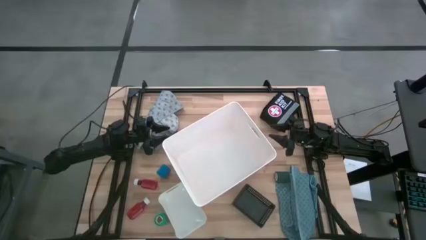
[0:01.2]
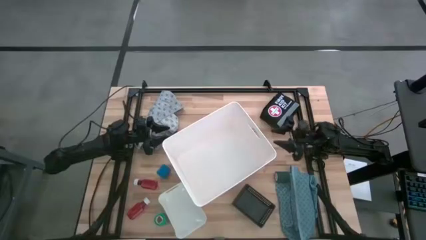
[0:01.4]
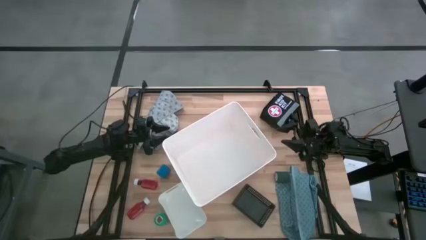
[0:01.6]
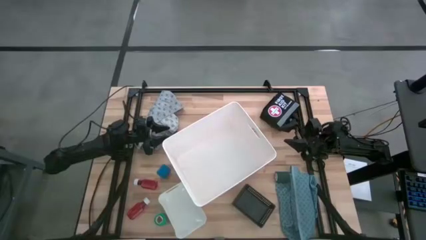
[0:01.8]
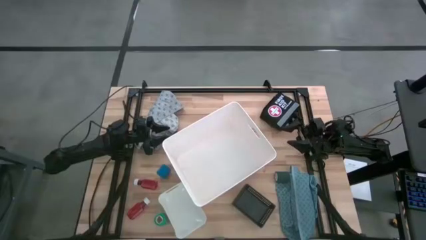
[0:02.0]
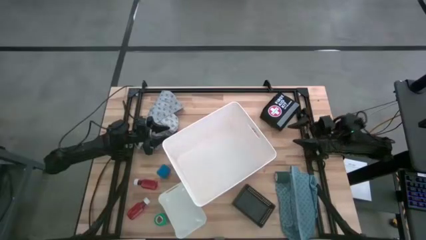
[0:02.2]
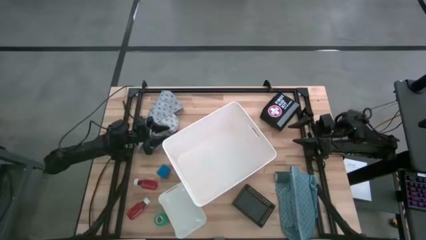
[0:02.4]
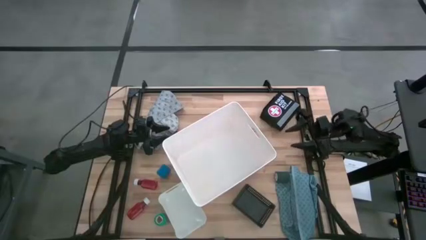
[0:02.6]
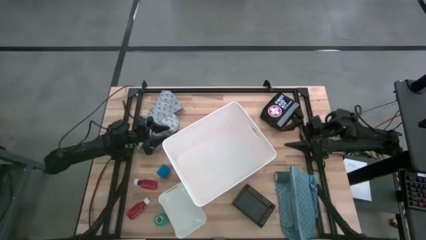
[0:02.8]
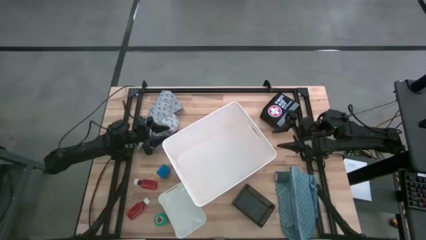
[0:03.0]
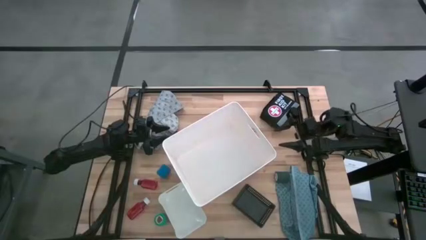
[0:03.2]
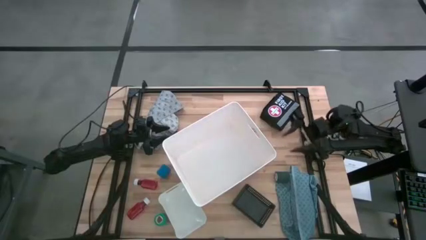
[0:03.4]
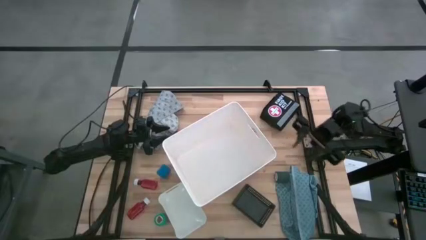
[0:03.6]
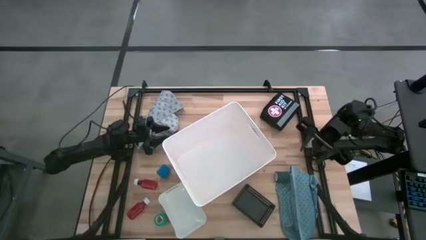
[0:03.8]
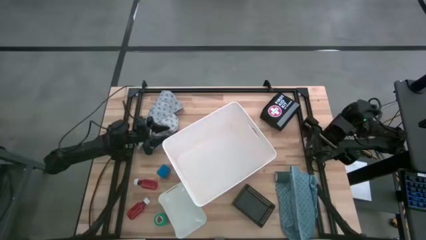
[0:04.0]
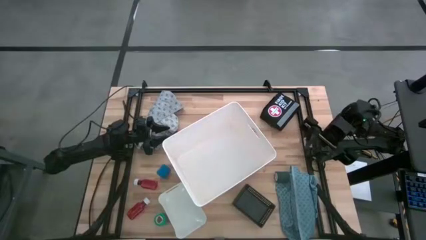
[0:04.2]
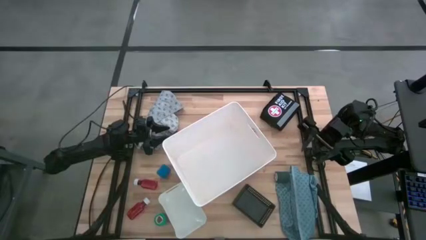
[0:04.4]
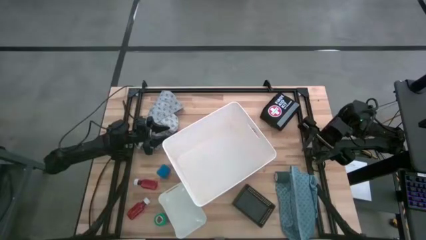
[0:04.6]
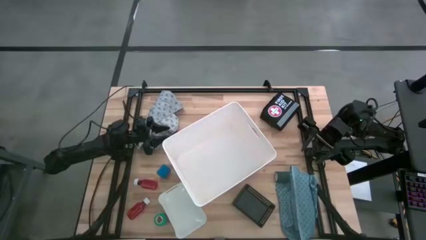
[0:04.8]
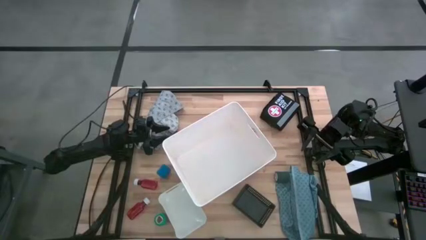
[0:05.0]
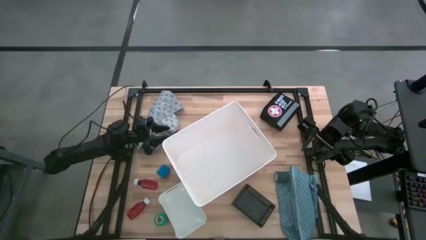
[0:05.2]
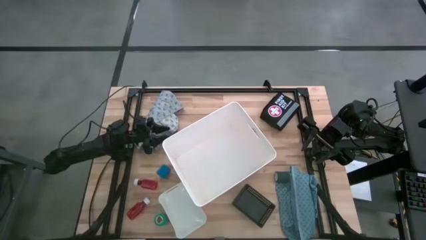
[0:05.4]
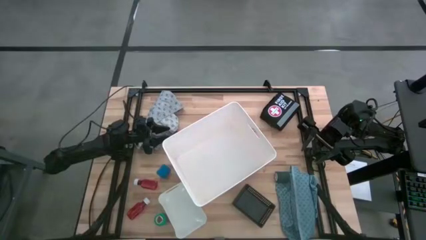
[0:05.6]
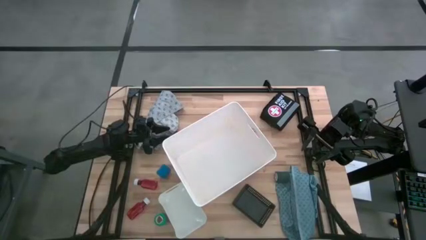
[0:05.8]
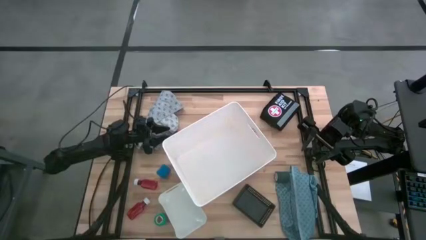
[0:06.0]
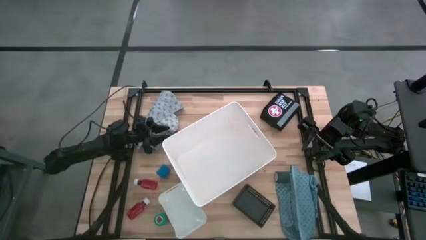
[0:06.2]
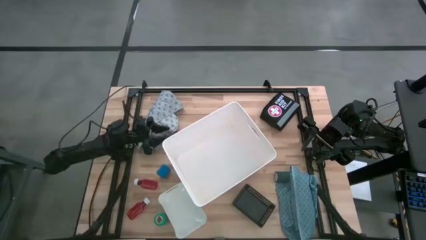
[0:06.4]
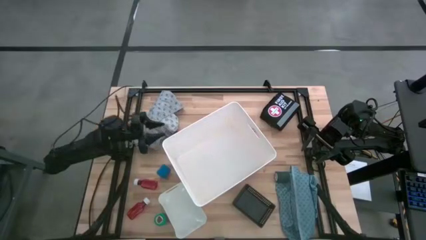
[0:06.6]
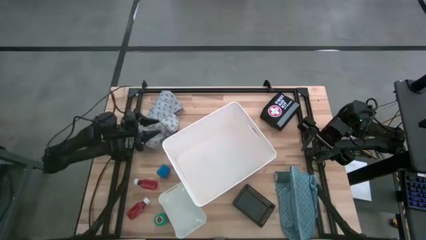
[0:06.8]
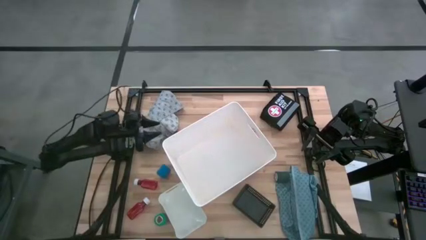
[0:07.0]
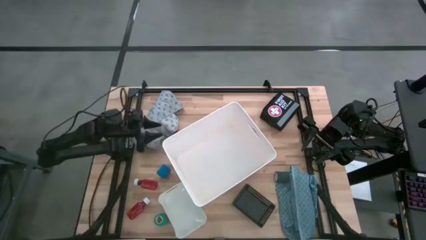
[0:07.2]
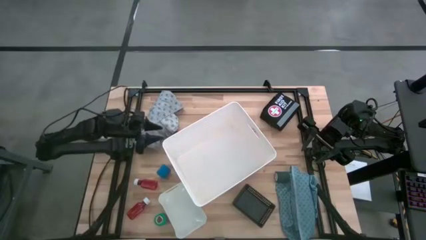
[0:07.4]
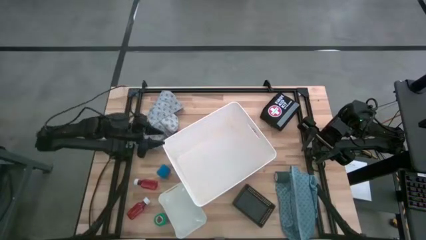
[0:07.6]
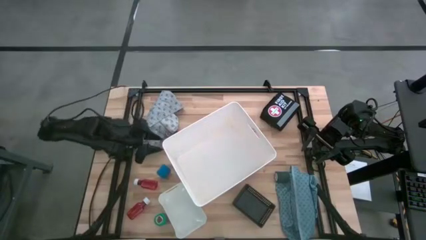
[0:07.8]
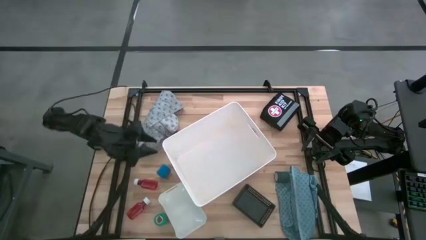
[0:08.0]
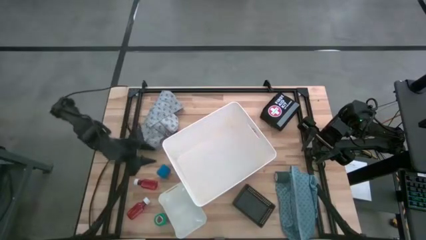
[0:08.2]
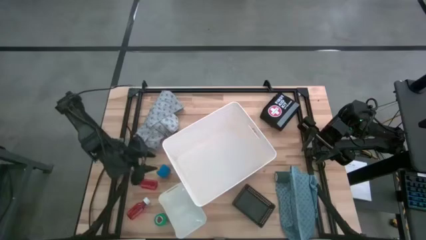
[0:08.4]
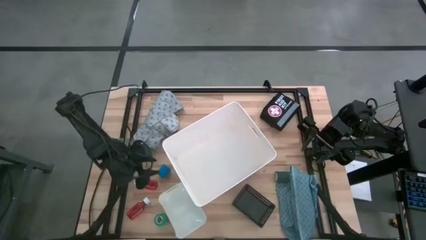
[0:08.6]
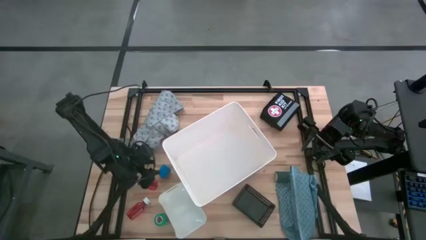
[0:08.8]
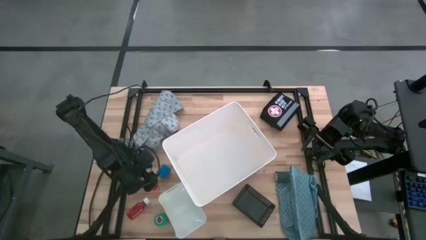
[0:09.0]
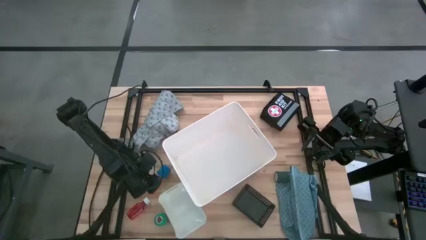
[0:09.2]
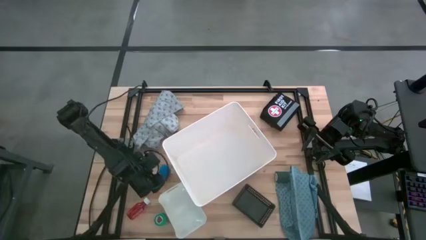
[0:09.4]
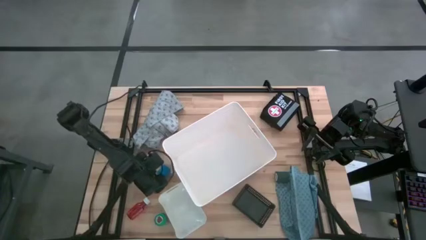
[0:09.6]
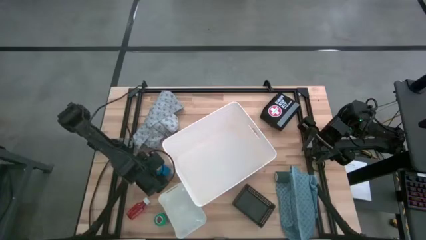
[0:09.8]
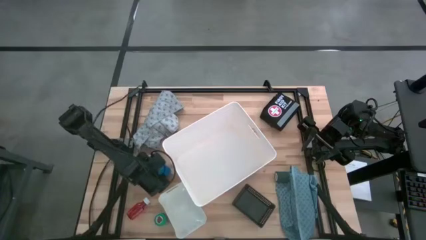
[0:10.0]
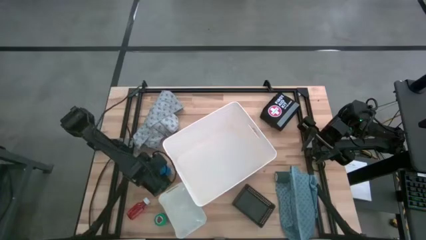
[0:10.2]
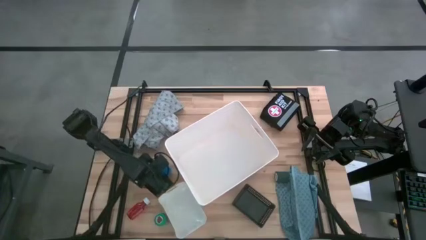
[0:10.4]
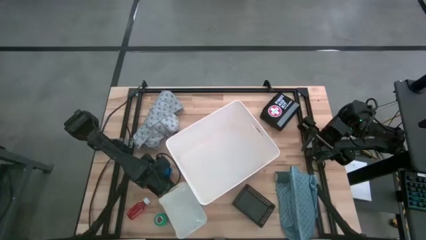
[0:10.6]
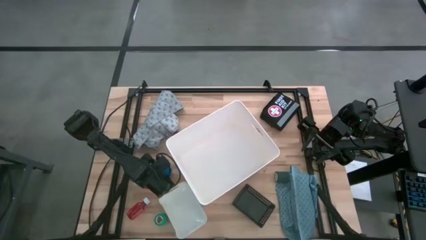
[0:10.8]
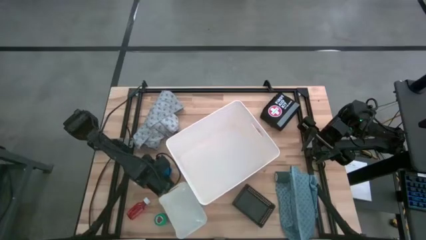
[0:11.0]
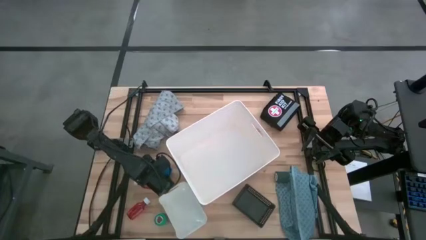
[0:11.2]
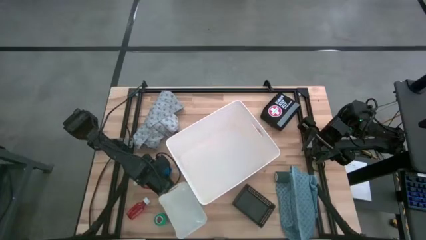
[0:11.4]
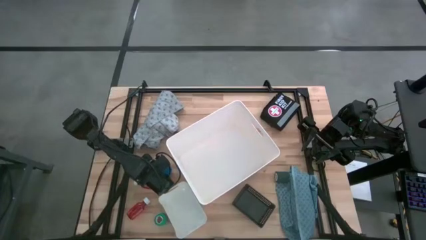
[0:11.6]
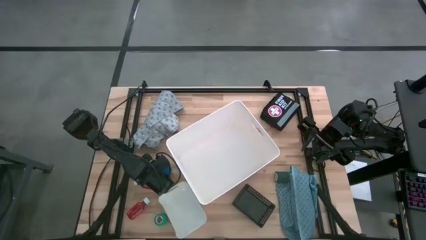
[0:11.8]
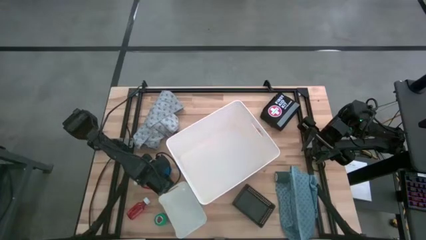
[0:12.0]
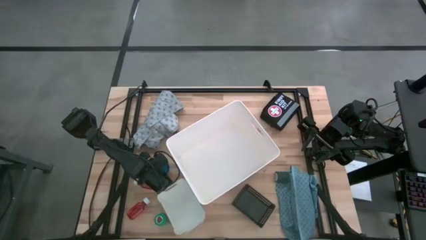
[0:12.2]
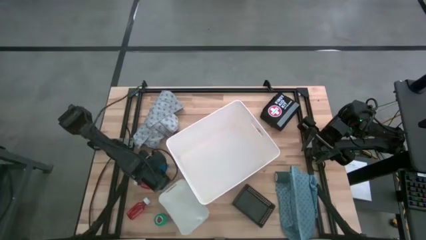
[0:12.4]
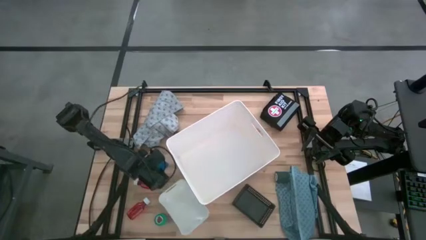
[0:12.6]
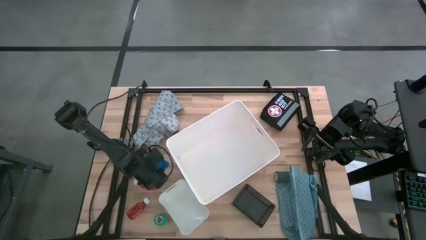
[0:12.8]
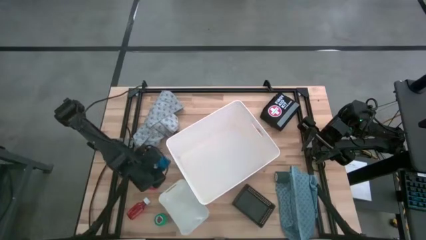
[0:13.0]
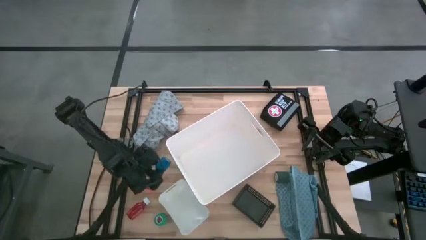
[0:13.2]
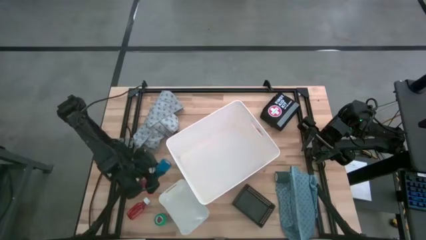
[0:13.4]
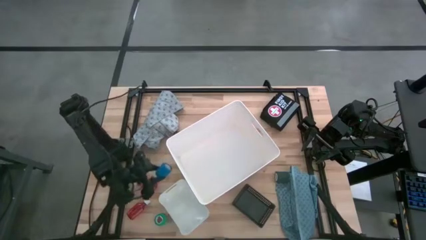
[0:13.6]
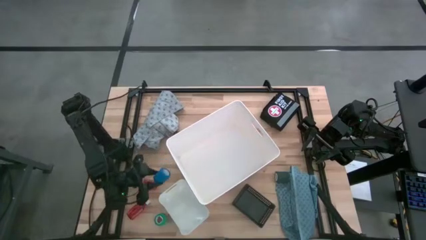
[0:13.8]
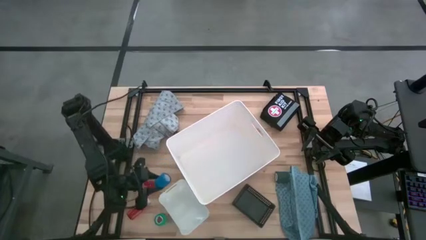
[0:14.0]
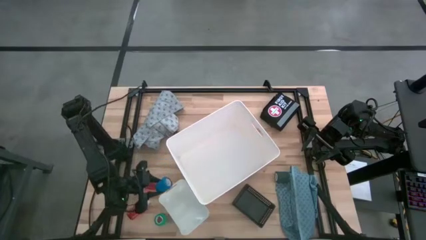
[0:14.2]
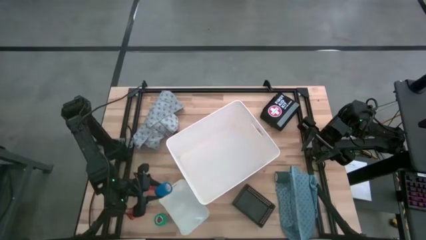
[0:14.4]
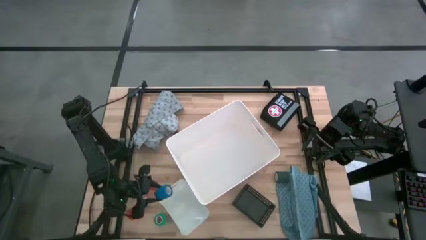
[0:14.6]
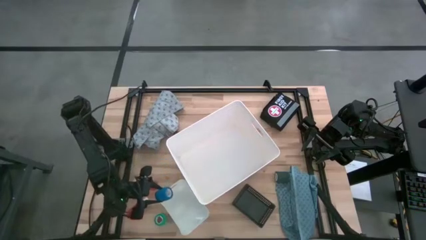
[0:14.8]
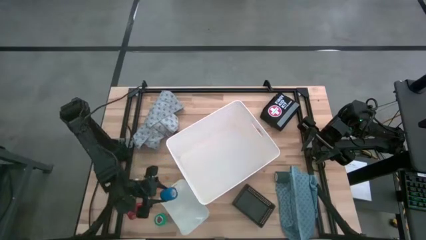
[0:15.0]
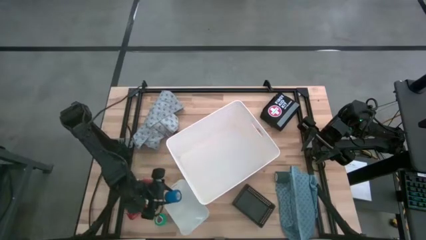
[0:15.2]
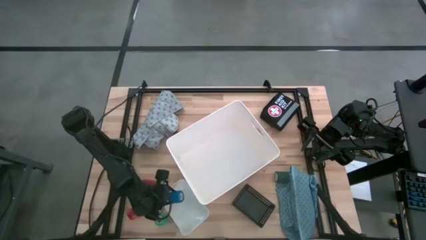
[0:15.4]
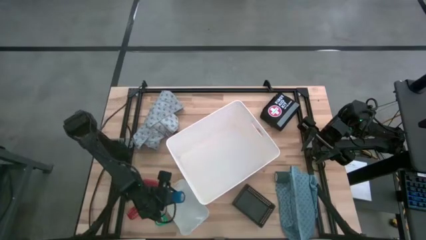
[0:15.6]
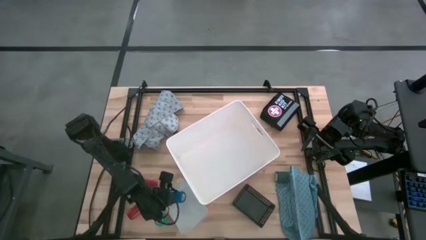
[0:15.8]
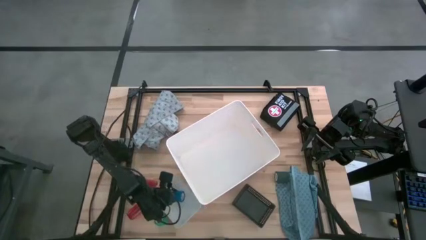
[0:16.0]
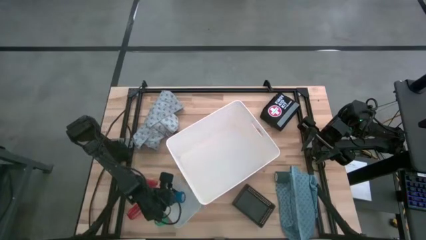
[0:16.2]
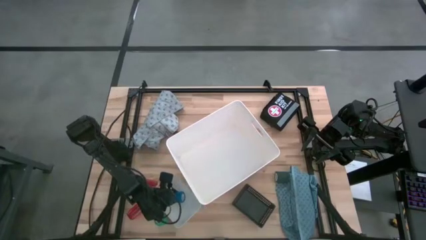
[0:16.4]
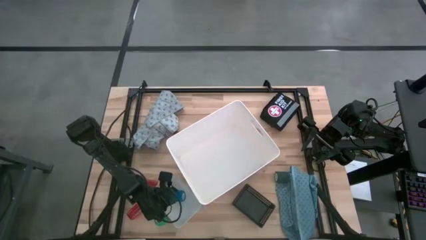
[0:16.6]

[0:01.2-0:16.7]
Task: Pick & place medical supplies in basket/bin
Put the blue bandage into the white bin
